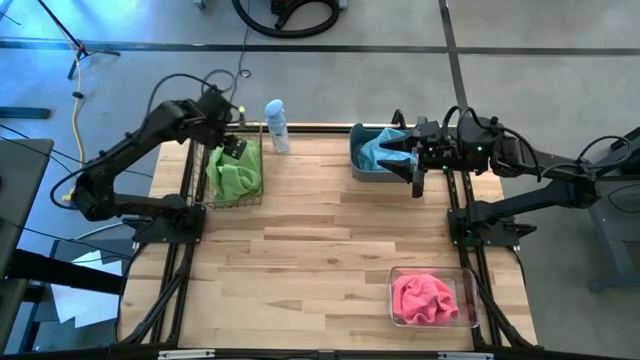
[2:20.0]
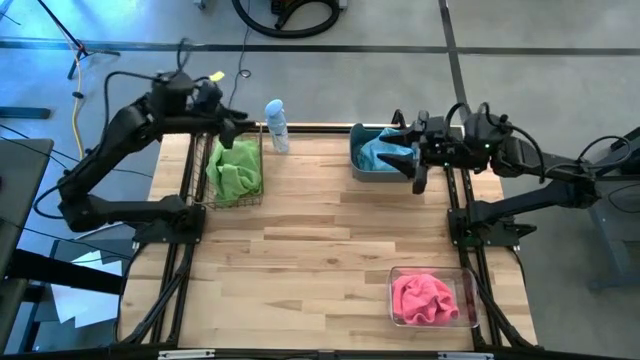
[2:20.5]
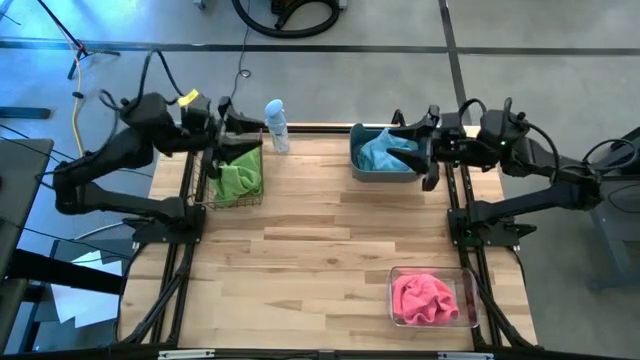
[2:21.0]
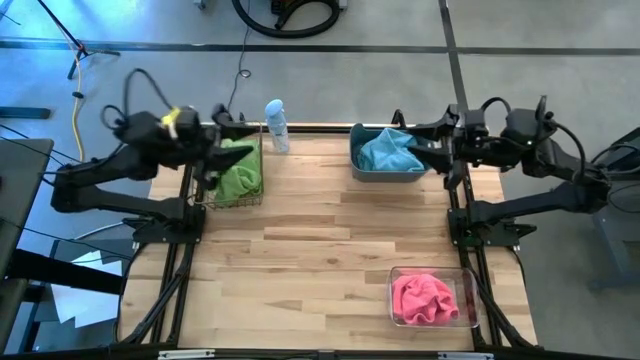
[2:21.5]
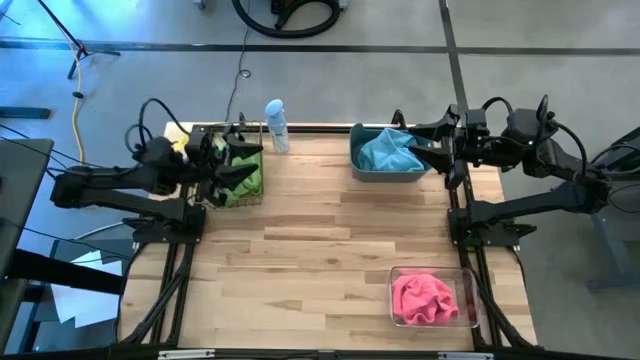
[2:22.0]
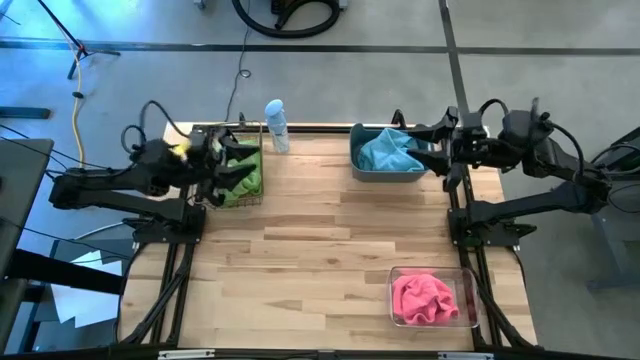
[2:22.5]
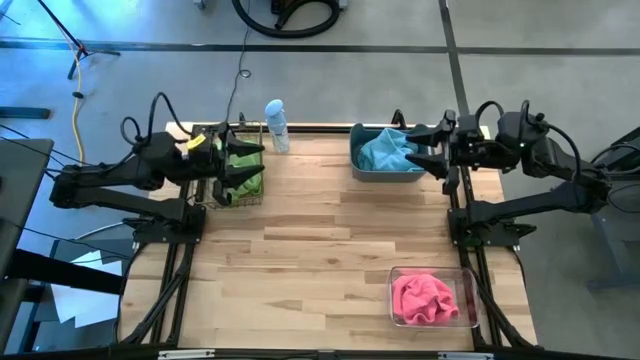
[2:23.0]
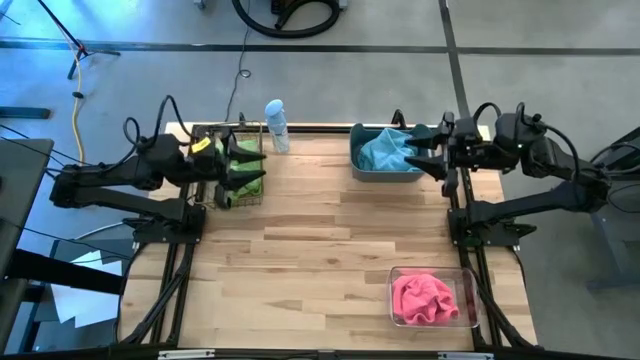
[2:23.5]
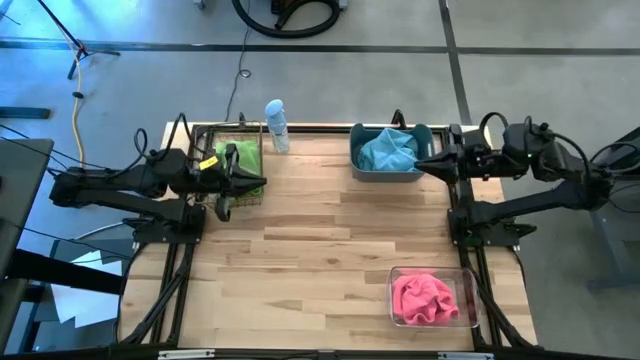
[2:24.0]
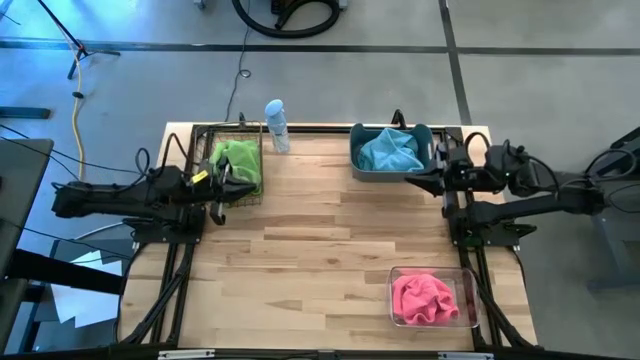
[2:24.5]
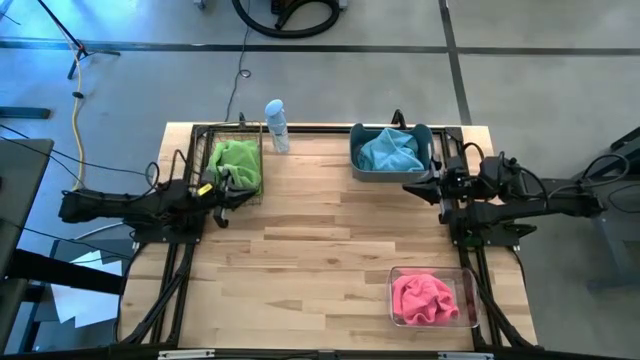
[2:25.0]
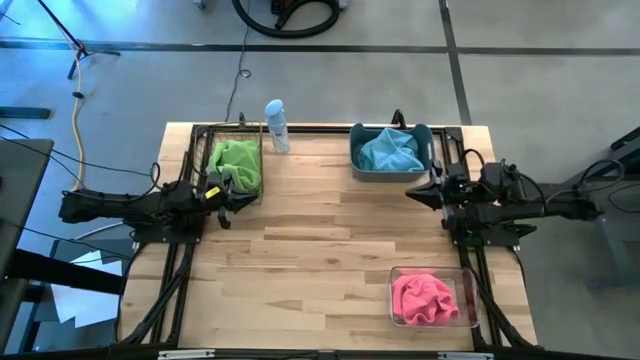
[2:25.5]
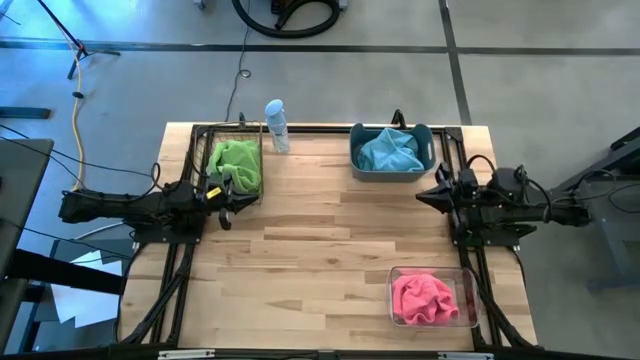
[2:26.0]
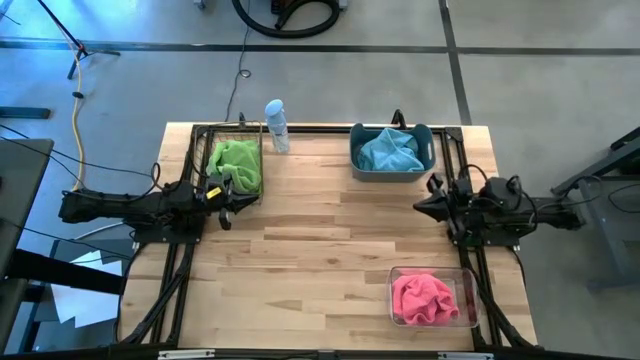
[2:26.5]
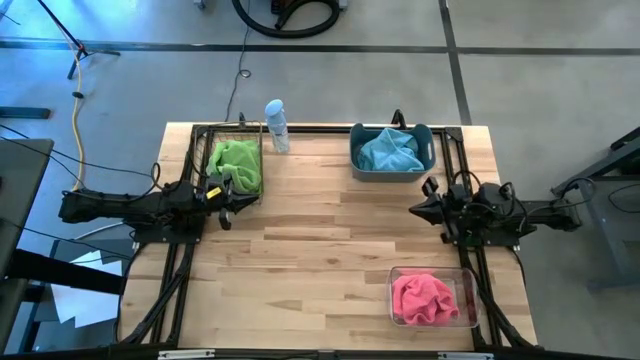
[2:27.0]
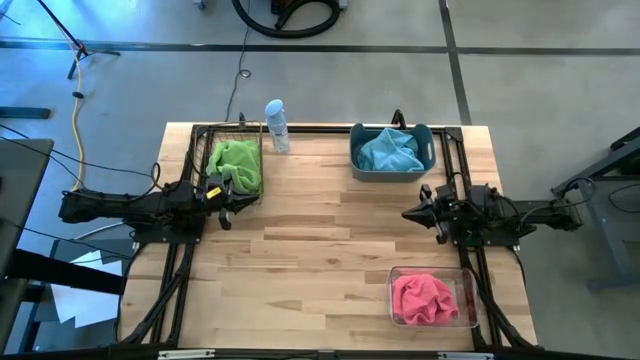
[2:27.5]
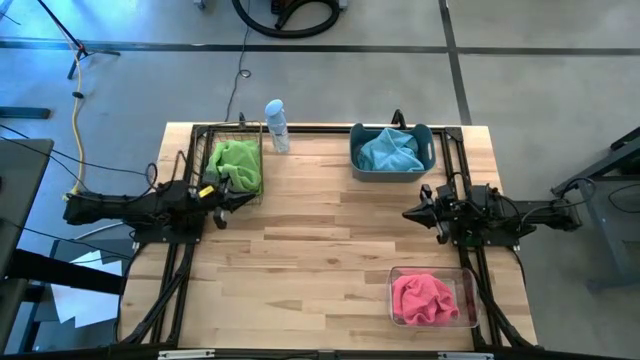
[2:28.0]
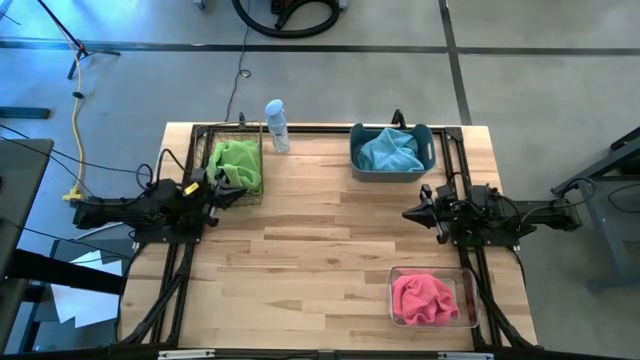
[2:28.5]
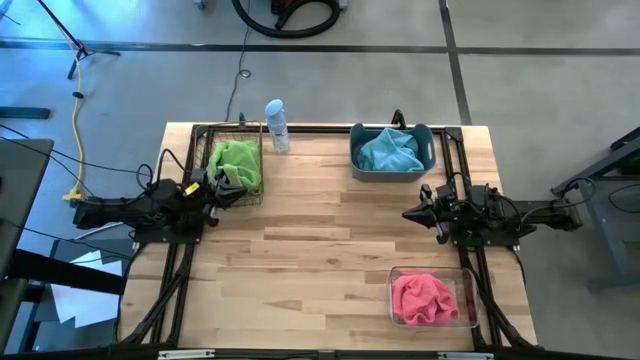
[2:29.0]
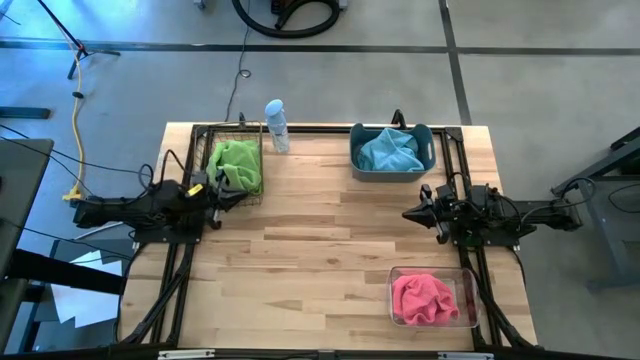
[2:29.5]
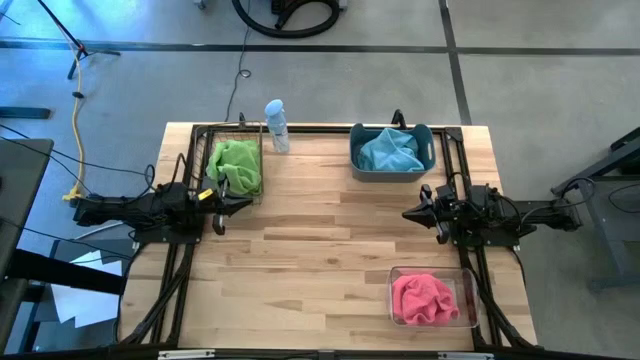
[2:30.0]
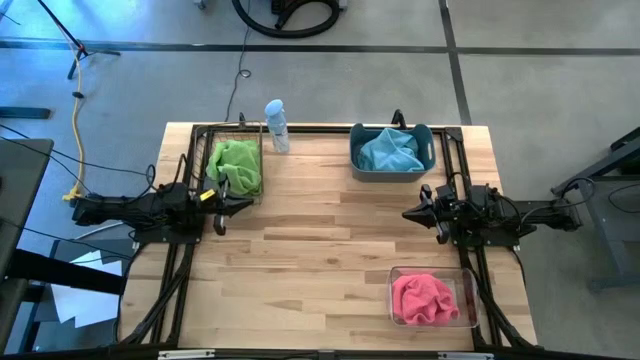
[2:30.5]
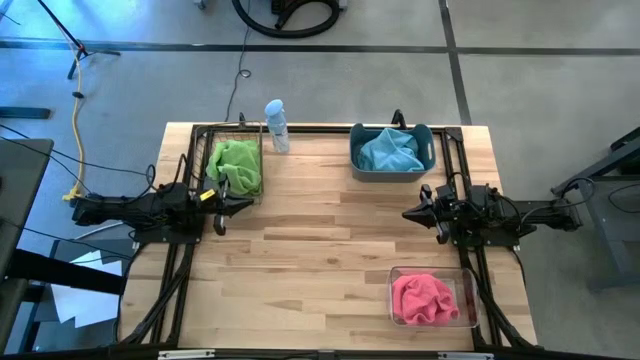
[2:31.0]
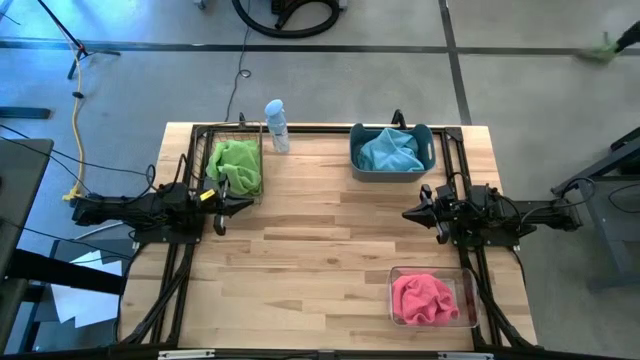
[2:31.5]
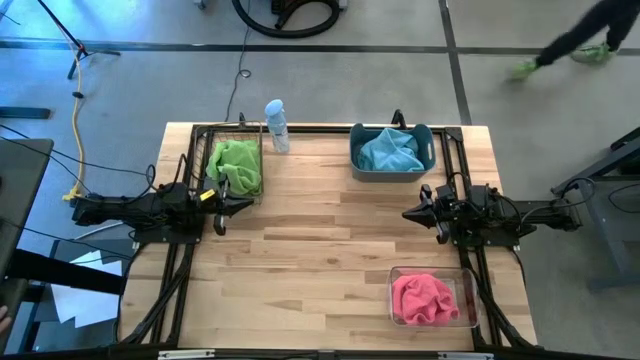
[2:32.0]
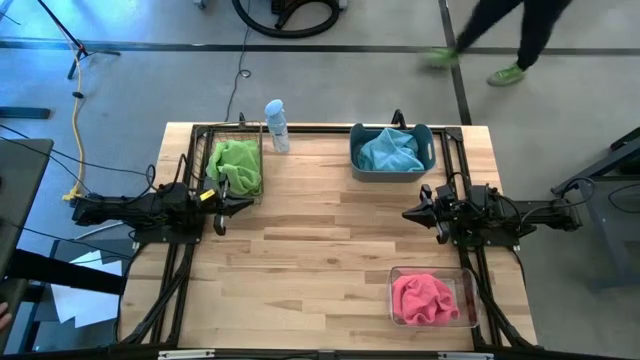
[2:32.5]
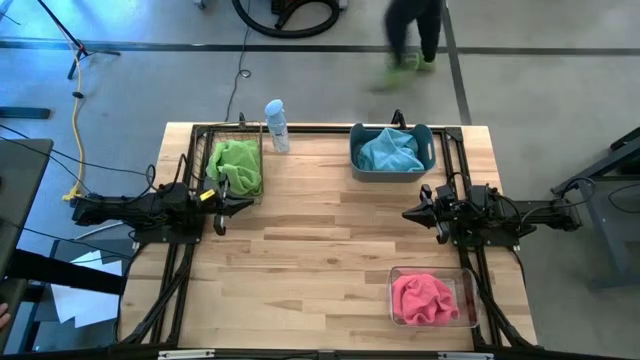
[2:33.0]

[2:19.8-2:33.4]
Task: Sort microfiber towel by color & place in baskets
Return to Home Position

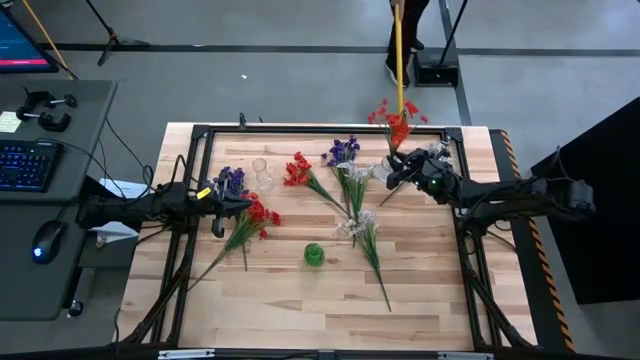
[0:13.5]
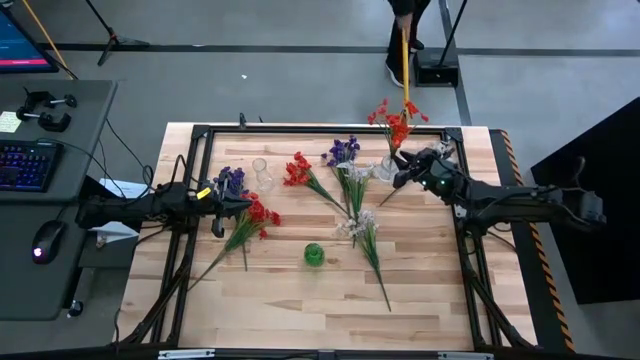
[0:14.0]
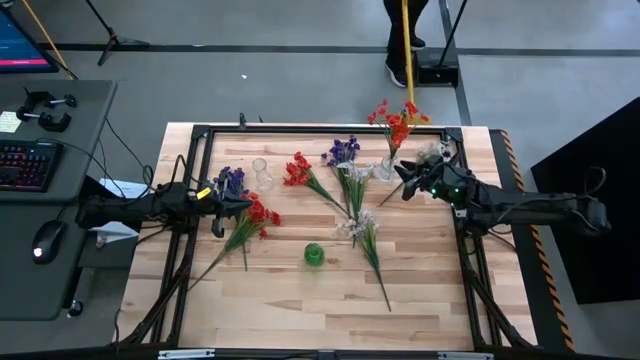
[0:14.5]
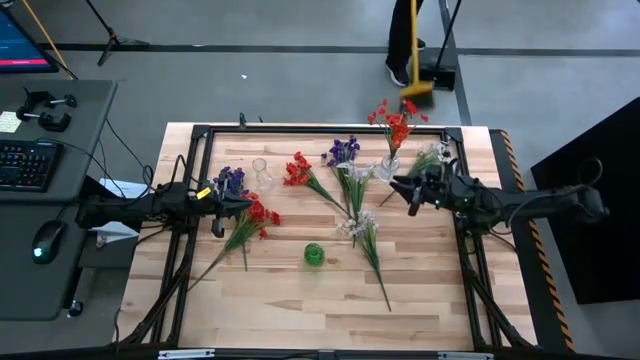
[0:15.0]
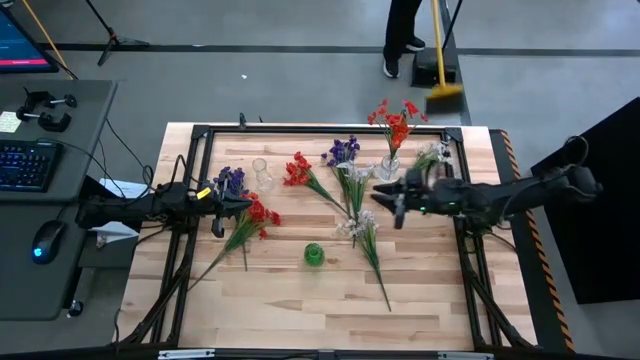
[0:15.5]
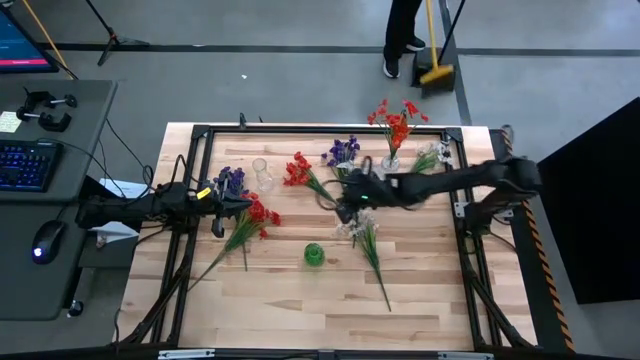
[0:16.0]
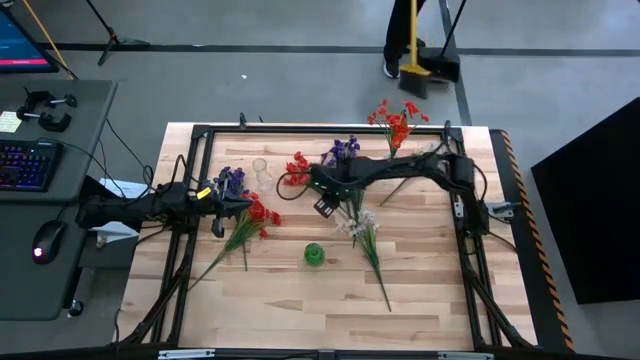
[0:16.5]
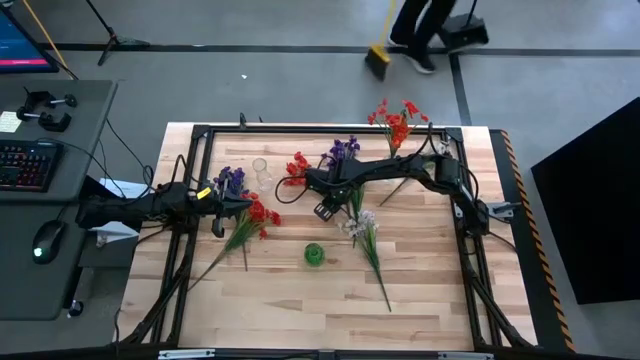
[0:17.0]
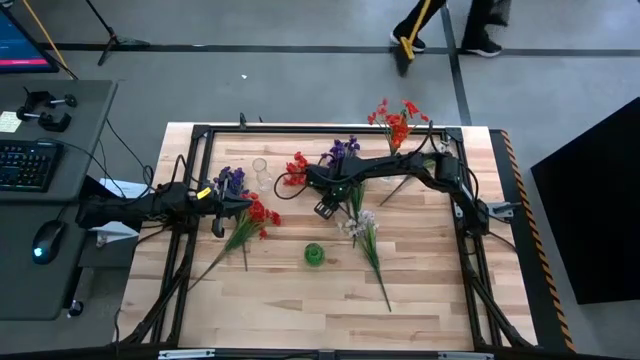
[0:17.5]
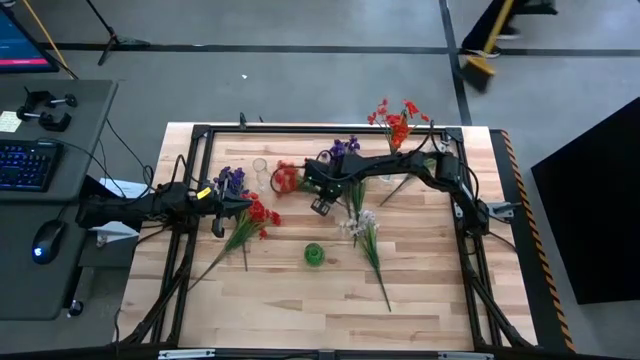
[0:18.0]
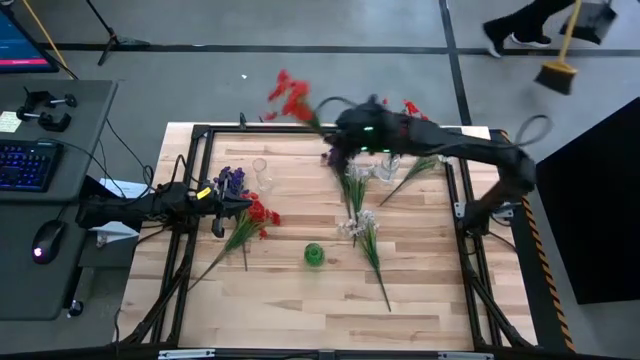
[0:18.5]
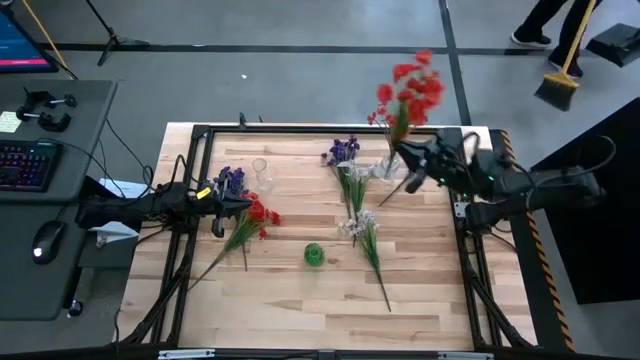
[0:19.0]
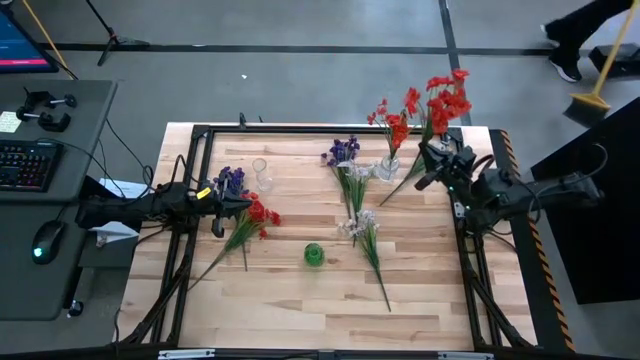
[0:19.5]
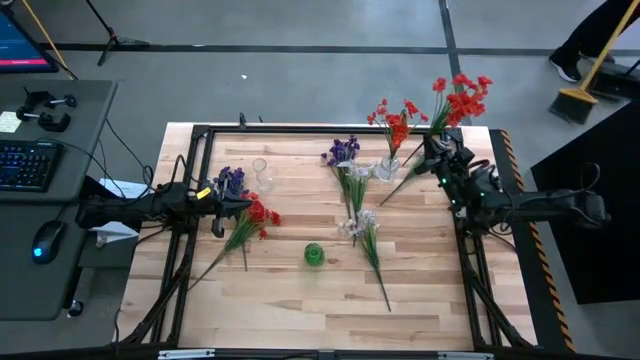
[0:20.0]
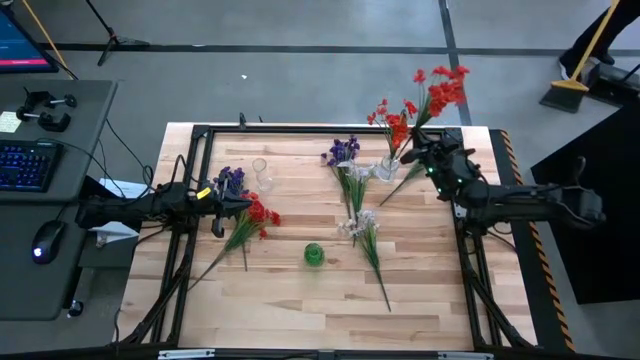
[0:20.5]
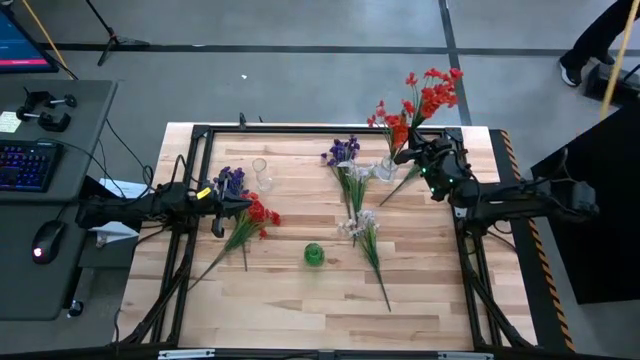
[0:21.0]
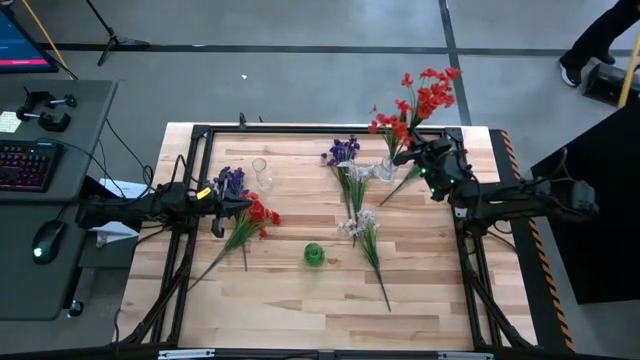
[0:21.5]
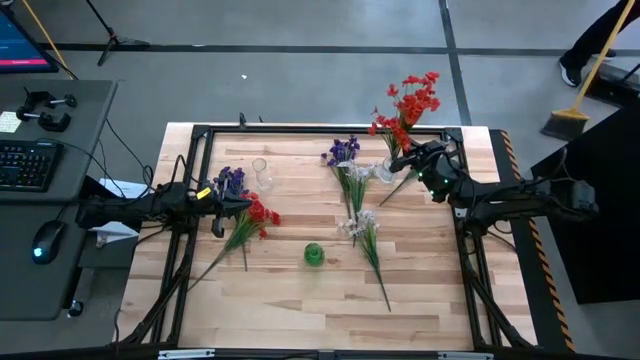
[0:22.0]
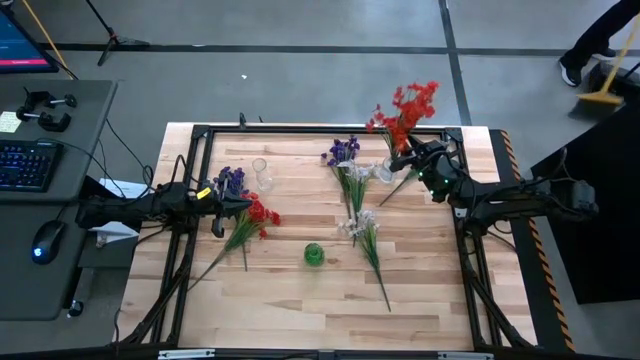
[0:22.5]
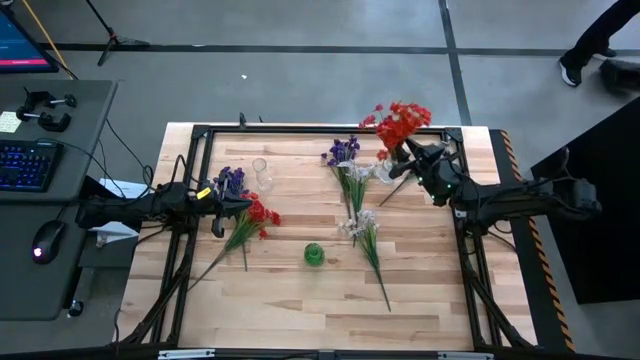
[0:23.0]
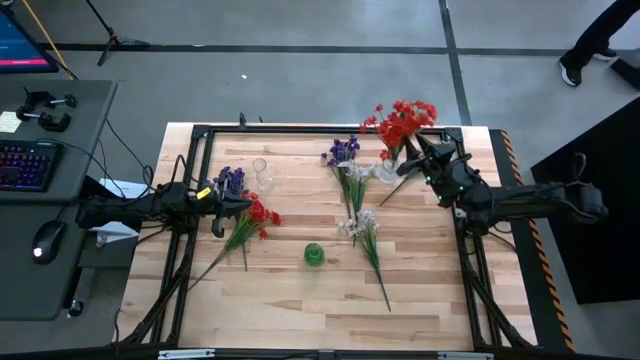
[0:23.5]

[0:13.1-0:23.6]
Task: Sort flowers into vase by color
Put the right orange flowers into the top right transparent flower vase
